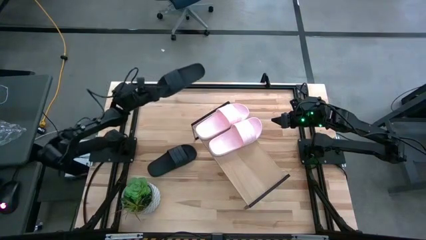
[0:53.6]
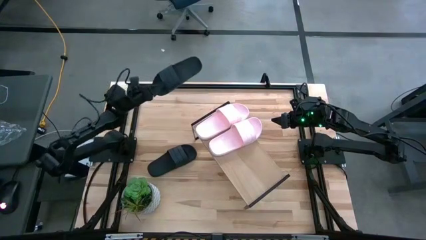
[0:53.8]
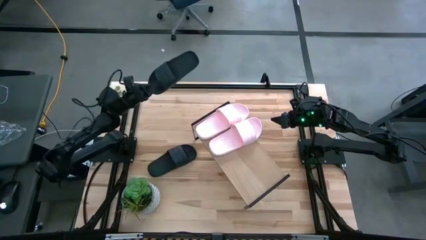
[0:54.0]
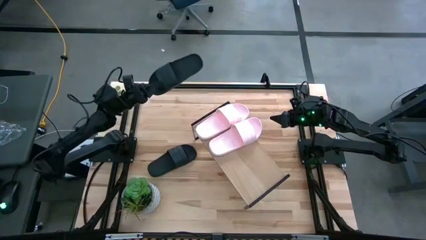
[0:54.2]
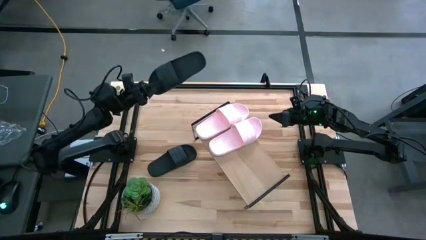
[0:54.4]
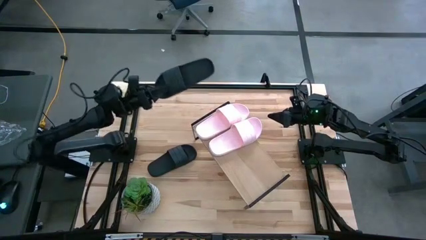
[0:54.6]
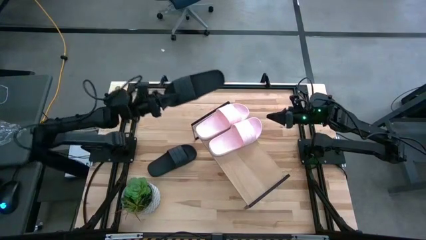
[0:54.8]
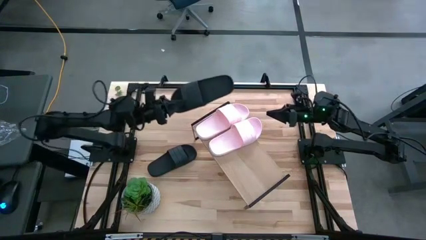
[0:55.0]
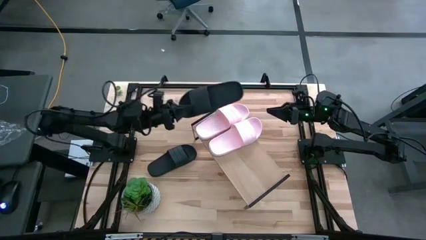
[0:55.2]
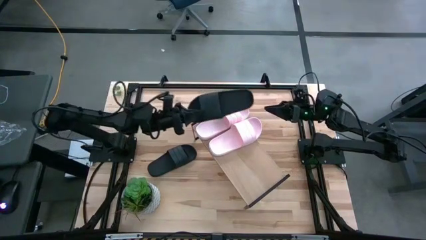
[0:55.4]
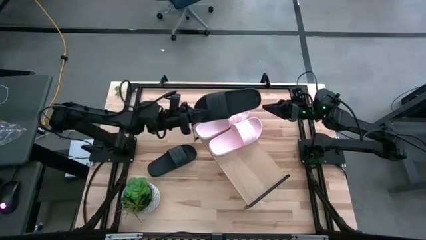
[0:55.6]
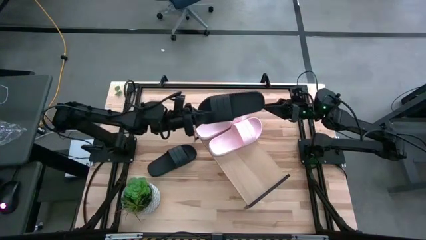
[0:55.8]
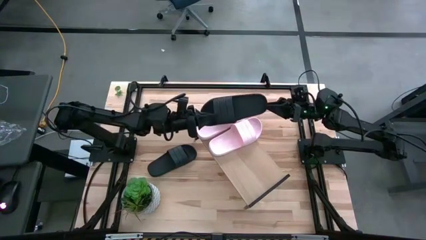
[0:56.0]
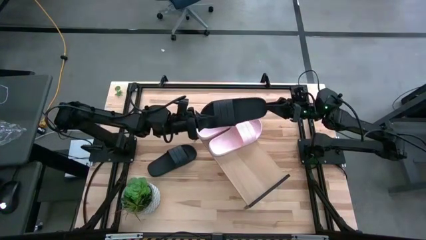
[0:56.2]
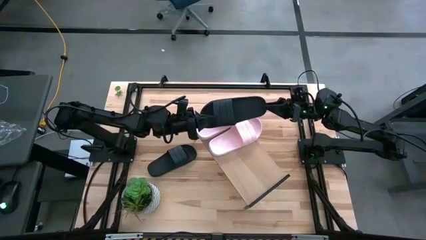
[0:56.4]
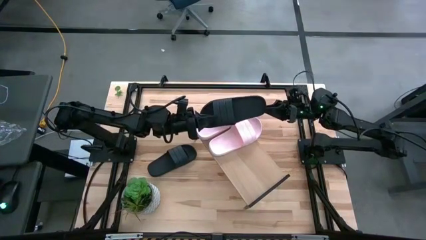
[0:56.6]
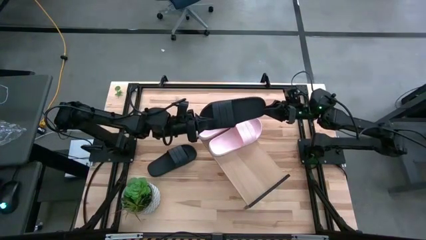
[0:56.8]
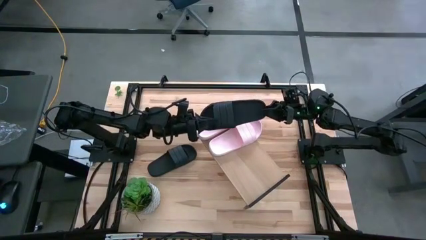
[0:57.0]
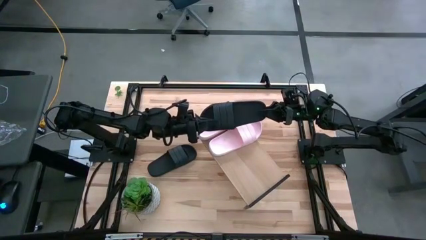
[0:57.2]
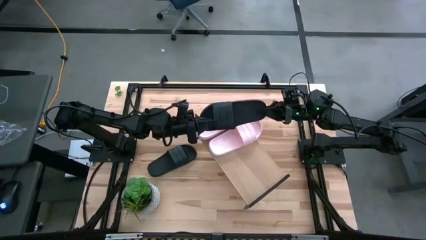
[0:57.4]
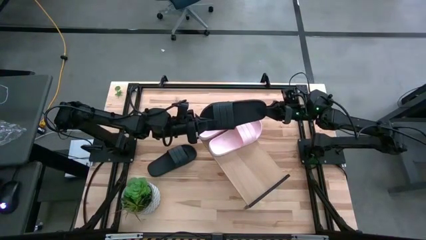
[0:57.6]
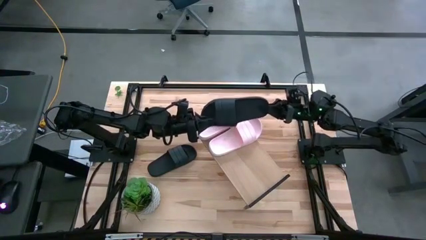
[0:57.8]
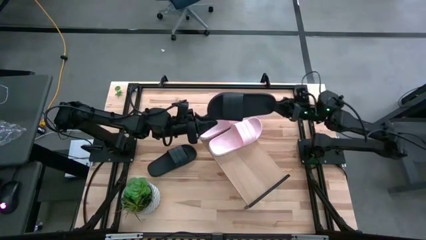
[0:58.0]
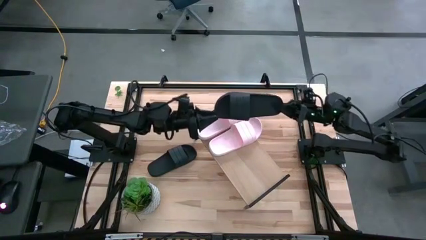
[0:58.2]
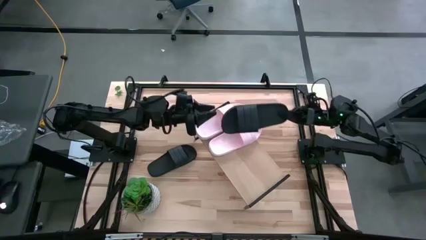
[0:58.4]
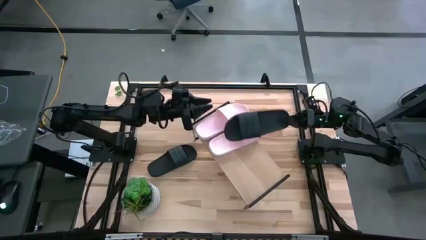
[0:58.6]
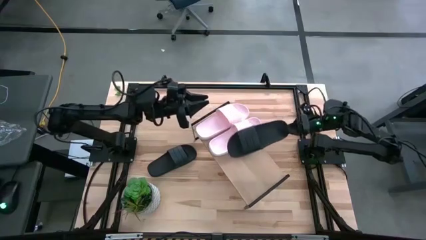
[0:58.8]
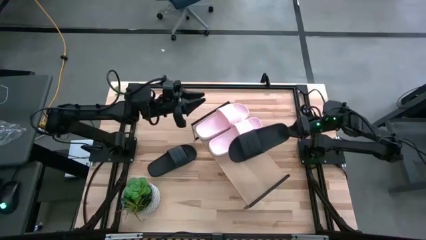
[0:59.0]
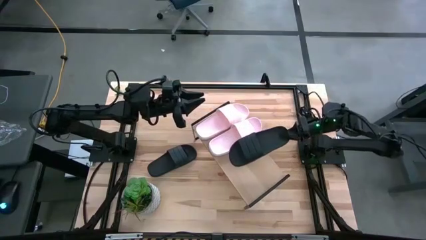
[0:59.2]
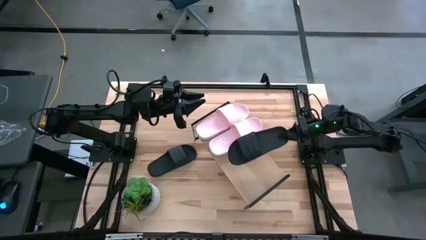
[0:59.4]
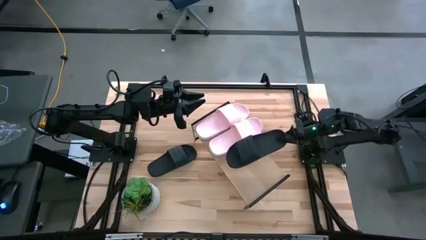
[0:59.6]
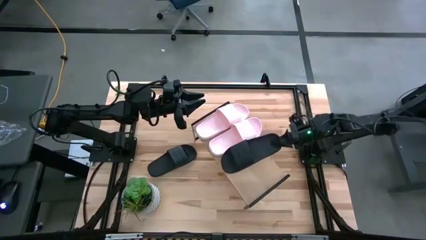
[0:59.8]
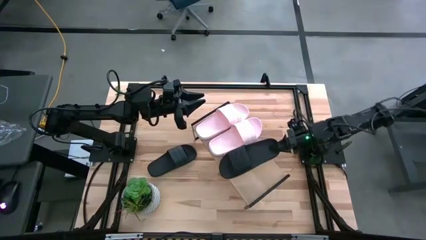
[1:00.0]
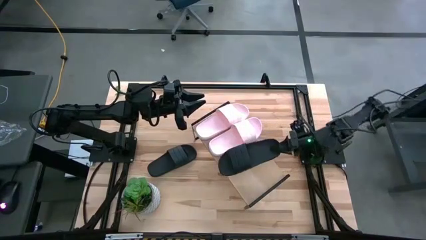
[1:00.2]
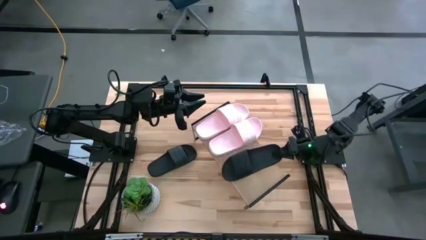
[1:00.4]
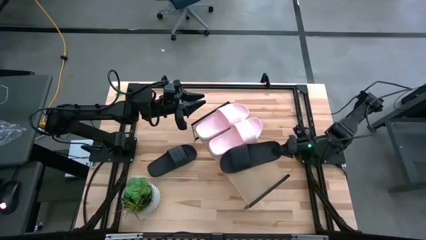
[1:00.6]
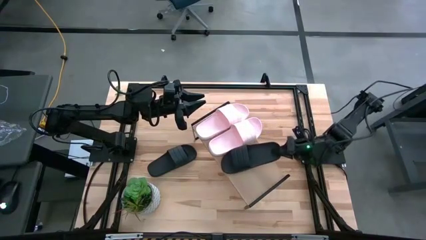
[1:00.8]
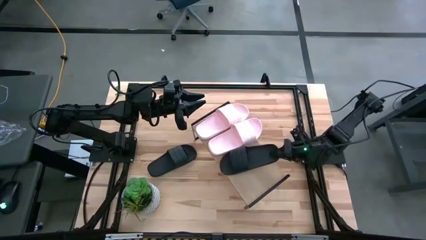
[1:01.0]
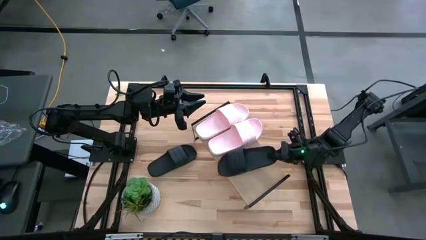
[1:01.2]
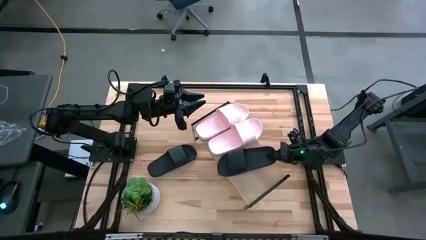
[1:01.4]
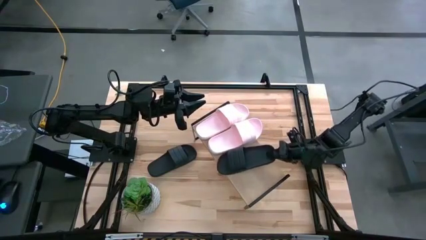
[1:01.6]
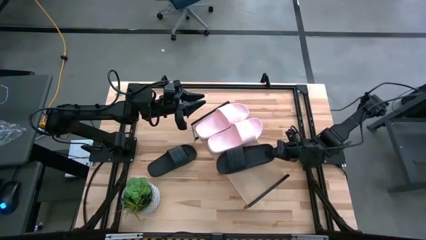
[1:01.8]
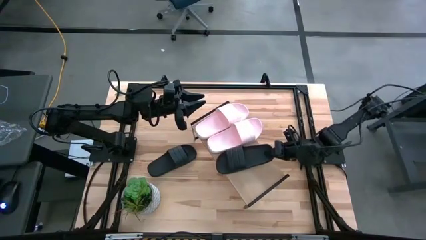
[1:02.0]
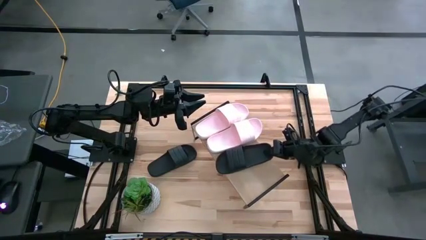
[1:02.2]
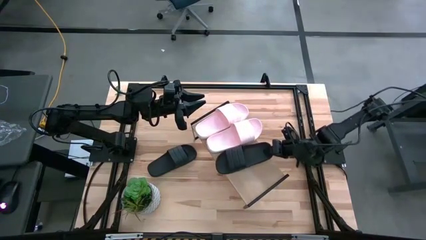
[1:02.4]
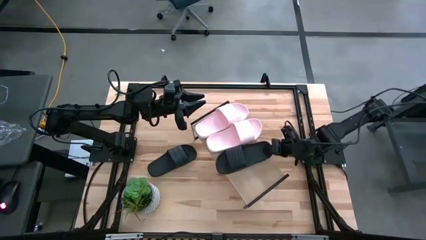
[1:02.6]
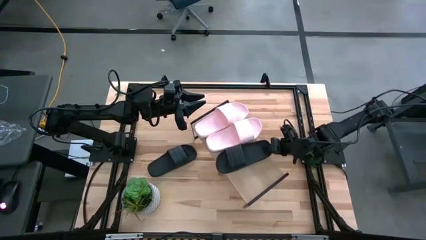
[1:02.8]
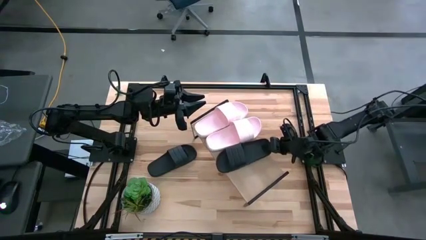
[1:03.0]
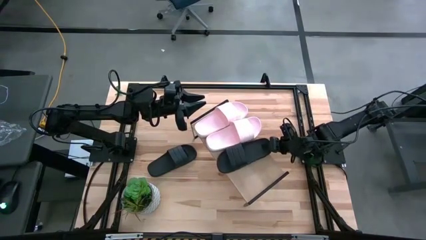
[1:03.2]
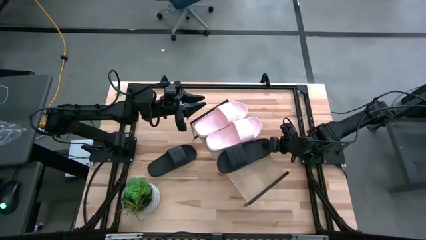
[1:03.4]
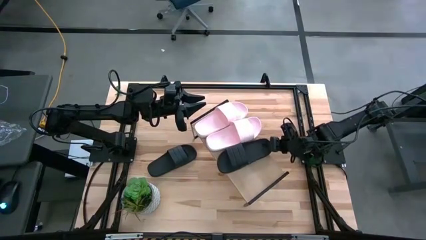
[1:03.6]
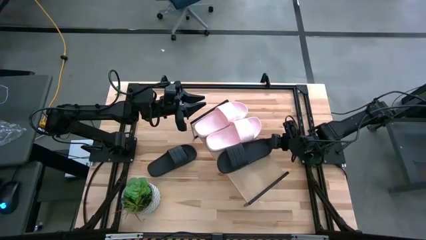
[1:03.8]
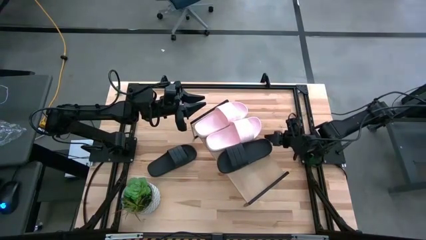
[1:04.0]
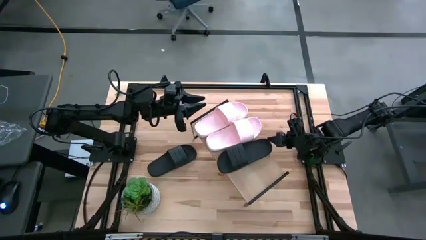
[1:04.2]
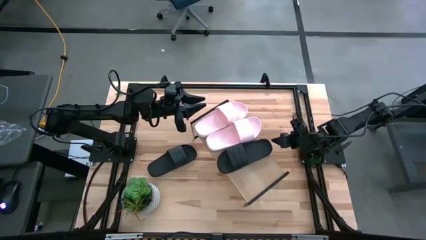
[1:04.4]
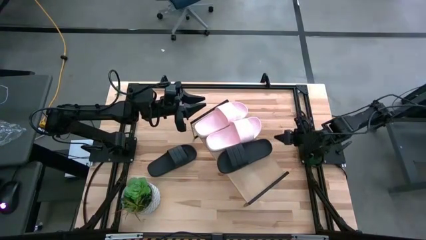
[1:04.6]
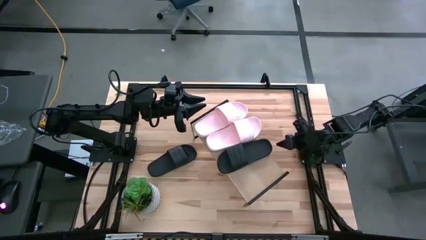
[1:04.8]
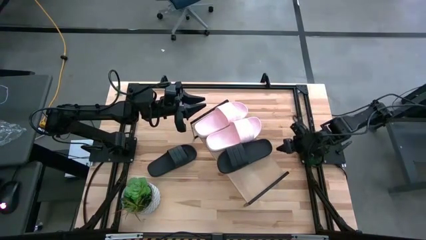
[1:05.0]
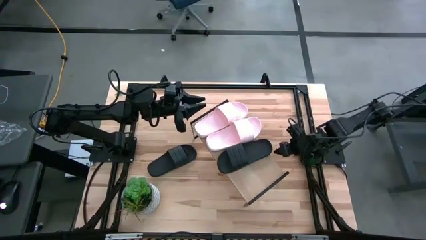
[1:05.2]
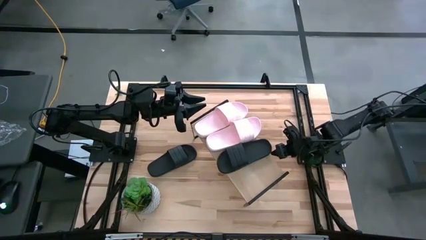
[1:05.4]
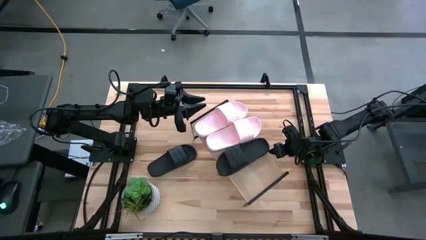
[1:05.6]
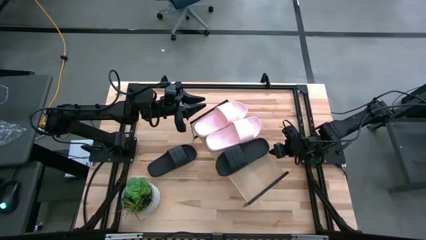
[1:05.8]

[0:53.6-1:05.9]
Task: Pick and place slides into the shelf
Put the top black slide on the shelf

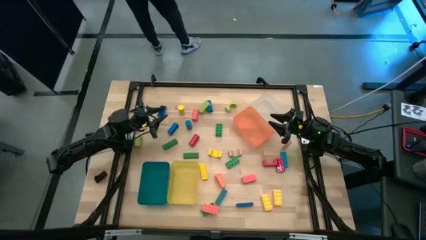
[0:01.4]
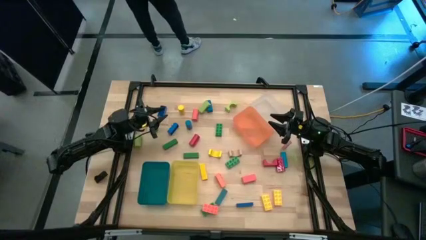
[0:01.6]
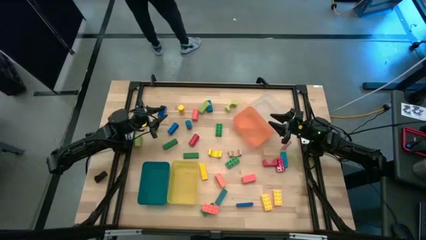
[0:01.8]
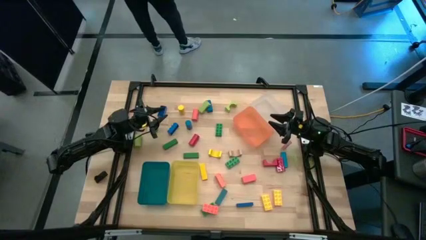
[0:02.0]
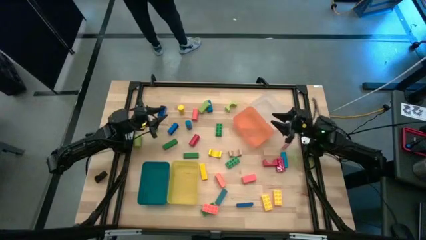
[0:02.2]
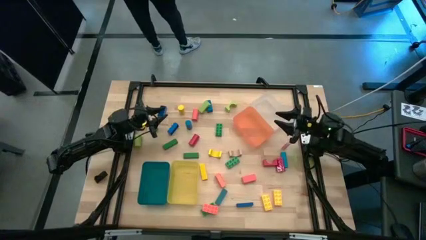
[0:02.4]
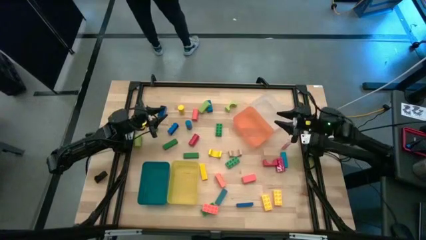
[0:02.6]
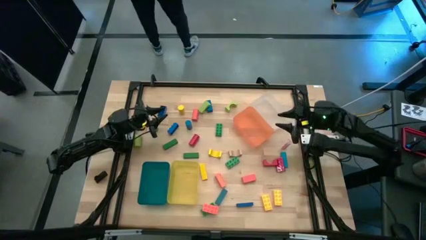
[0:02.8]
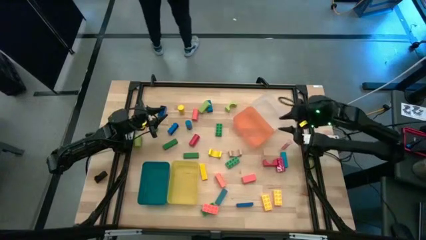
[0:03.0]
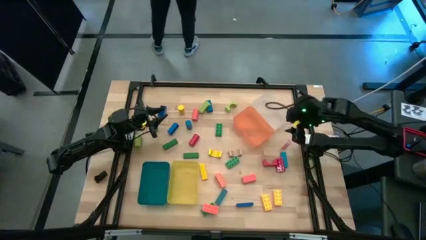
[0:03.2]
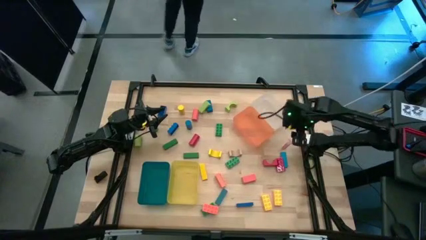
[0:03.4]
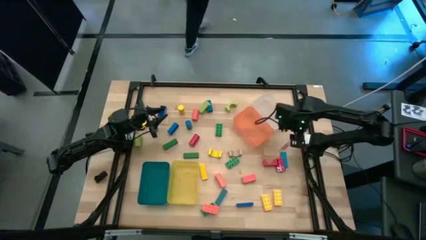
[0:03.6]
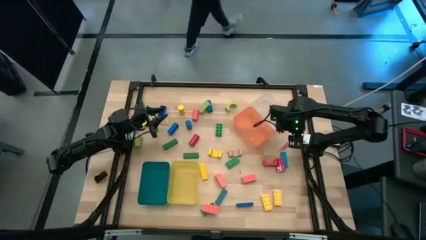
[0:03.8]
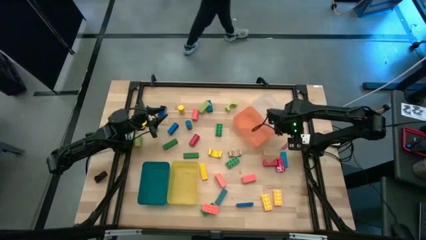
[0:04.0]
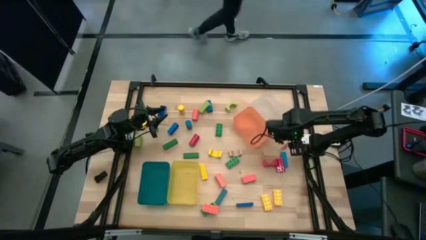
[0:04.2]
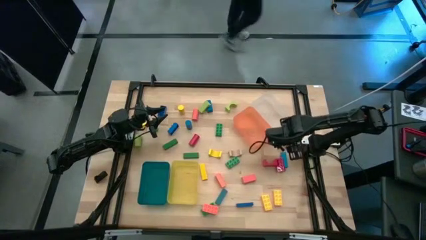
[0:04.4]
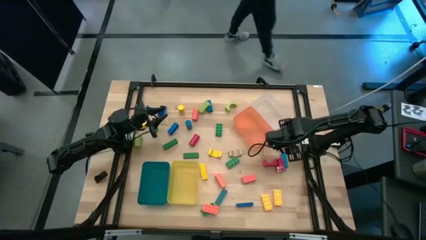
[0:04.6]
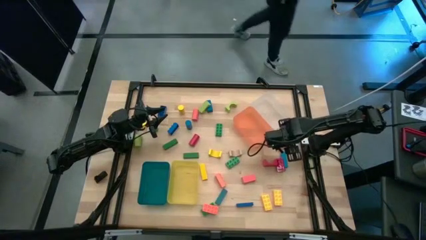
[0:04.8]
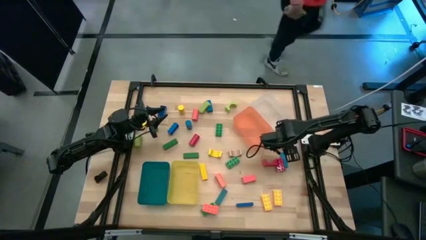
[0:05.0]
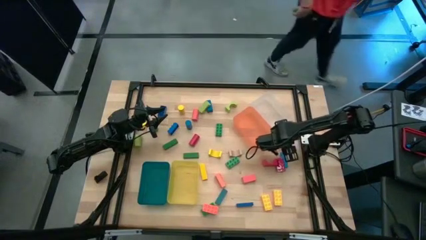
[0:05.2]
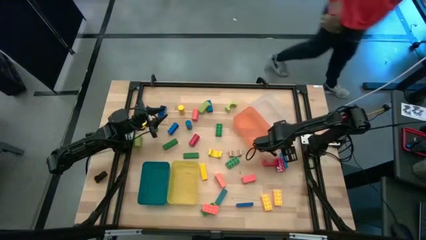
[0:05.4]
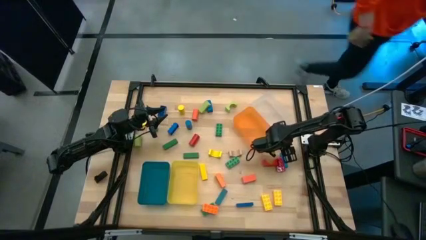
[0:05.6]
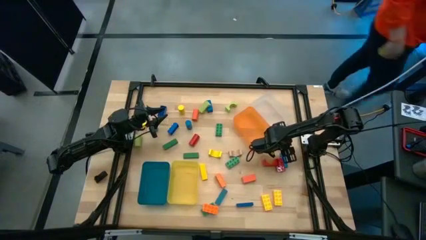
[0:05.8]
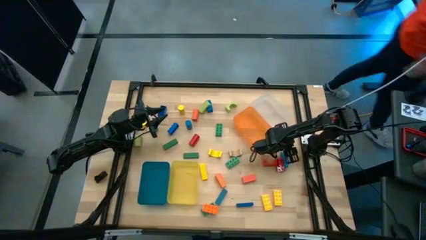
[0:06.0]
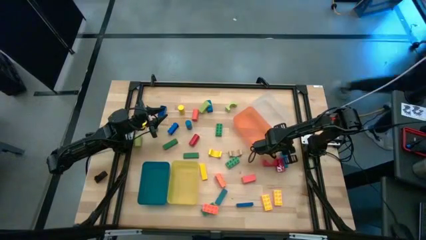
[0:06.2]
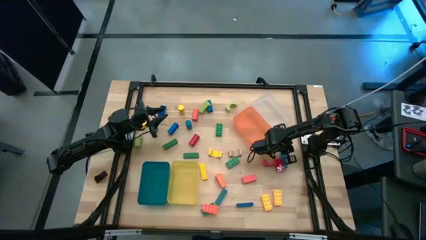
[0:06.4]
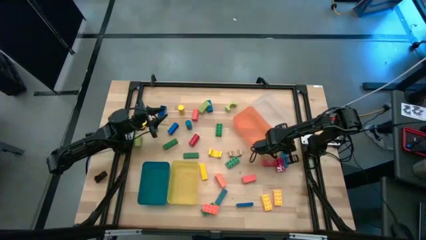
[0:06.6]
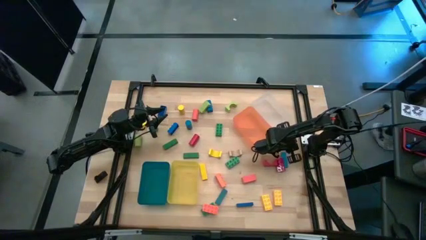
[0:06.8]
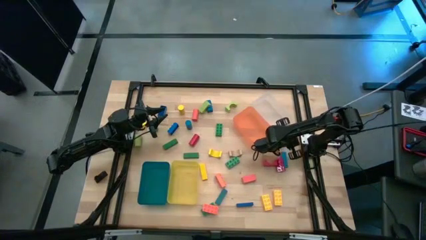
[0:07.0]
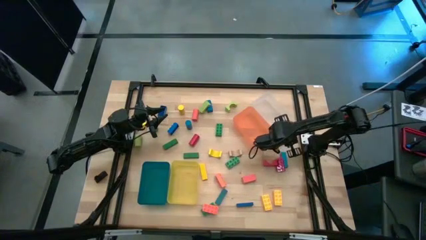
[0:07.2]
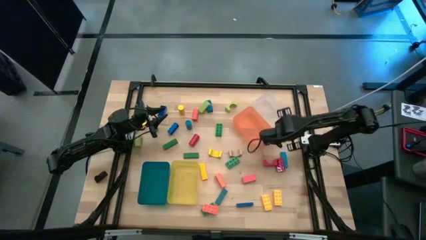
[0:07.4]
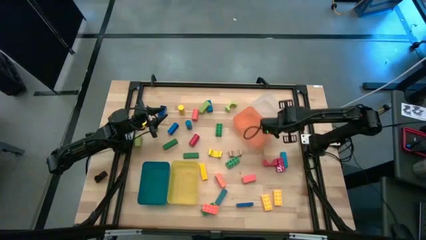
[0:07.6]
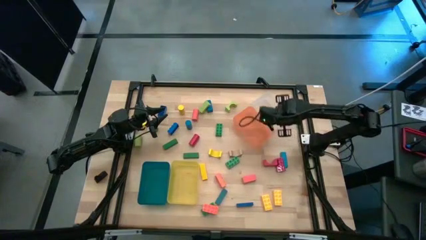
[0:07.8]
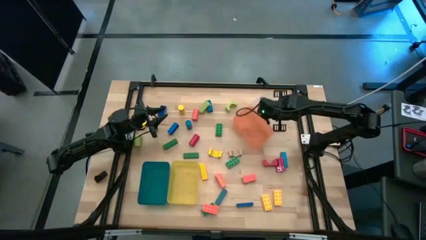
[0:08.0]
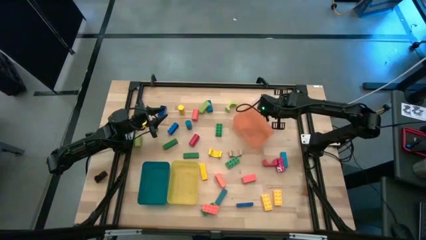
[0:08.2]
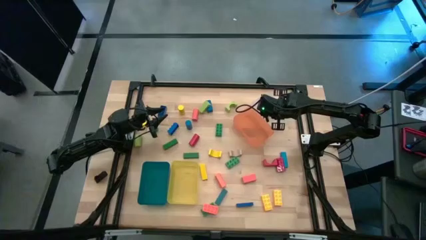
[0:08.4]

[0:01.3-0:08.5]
Task: Sort blocks by size
Put the pink rectangle block into the transparent bin
